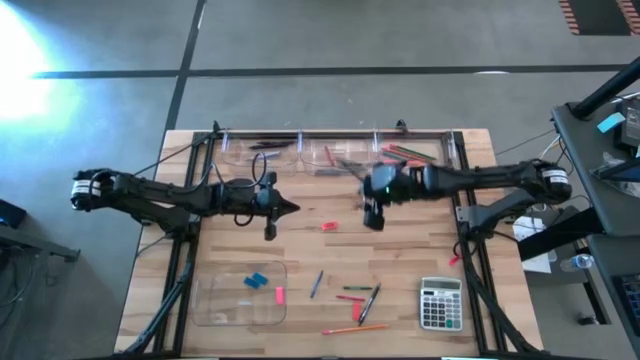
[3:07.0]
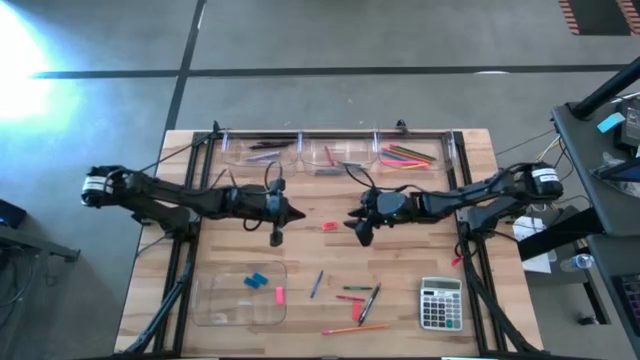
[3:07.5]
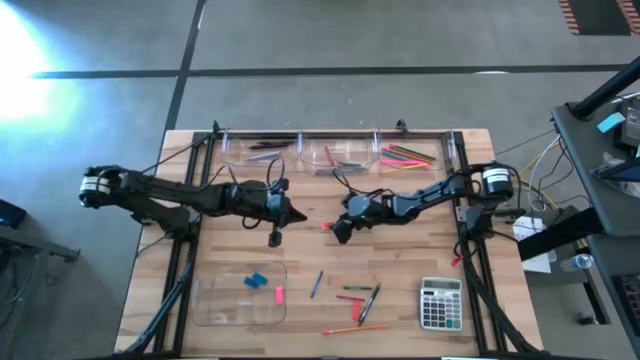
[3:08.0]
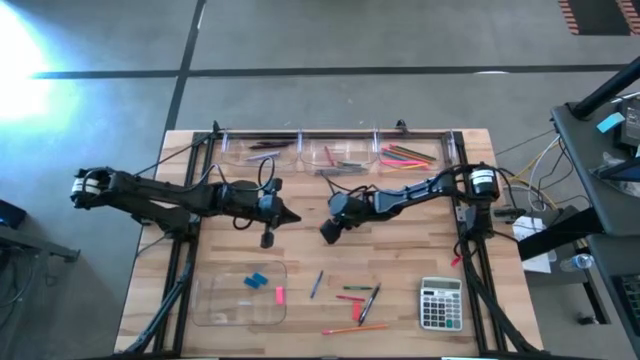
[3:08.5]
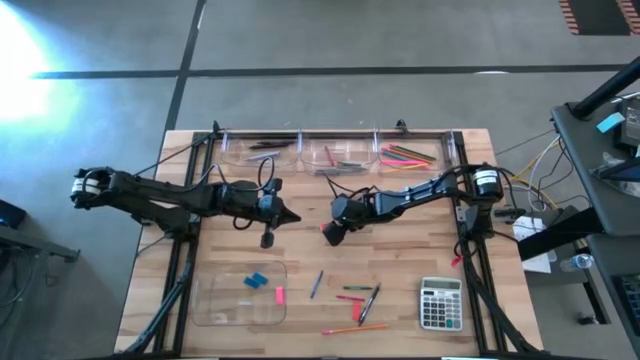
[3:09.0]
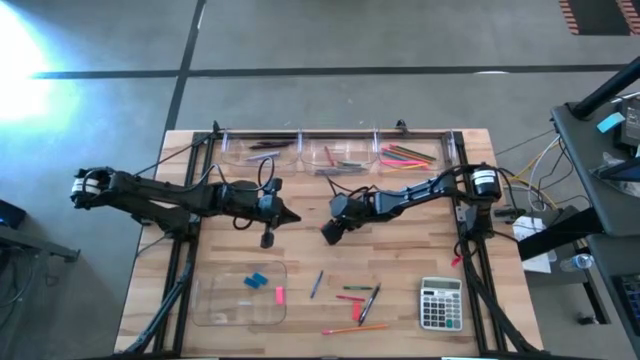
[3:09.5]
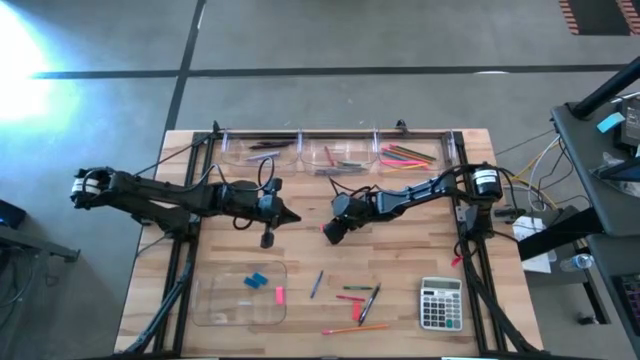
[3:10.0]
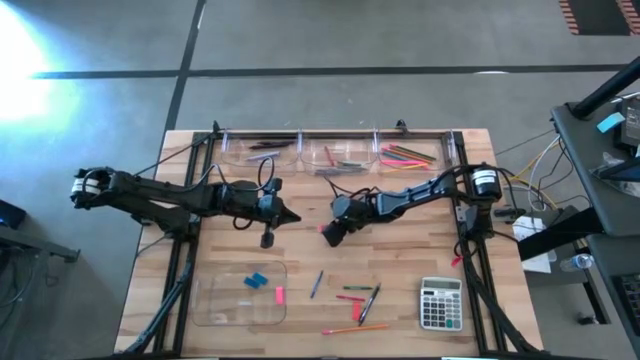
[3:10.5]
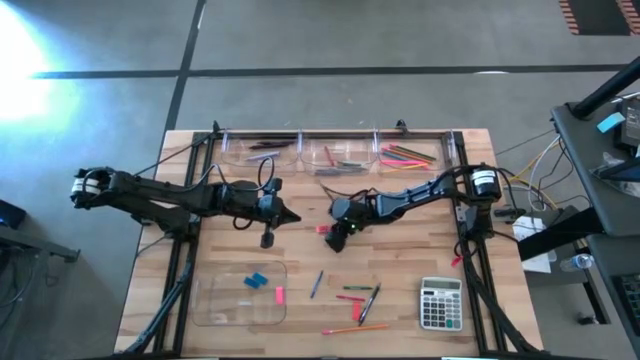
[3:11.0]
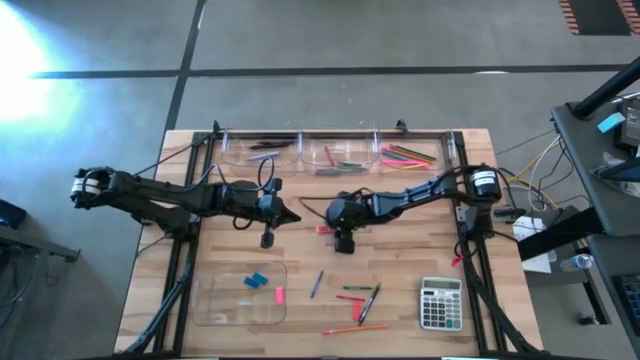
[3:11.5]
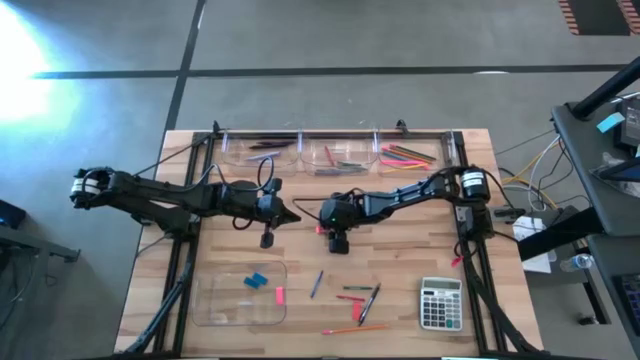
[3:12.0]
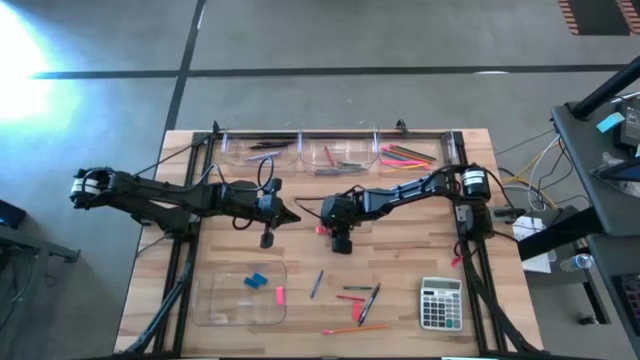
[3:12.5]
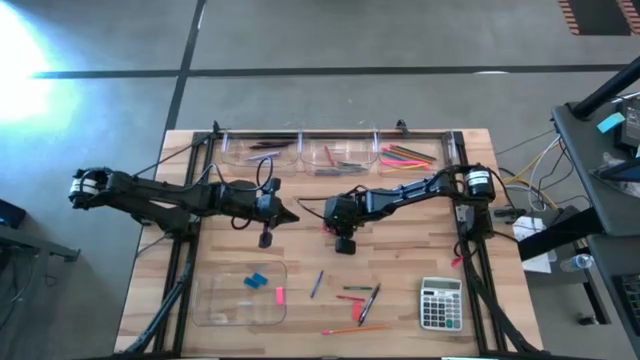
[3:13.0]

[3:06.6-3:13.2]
Task: Sort crayons/erasers/pens/pencils in bins
Put the orange eraser into the bottom transparent bin

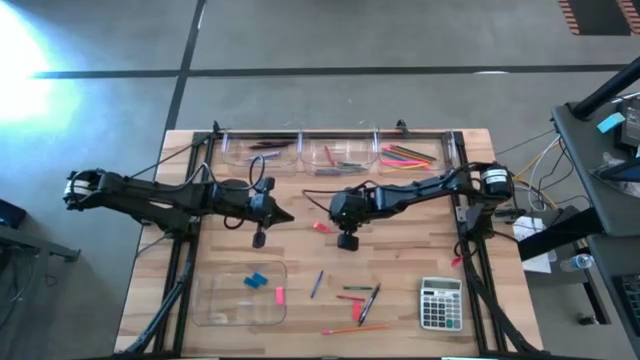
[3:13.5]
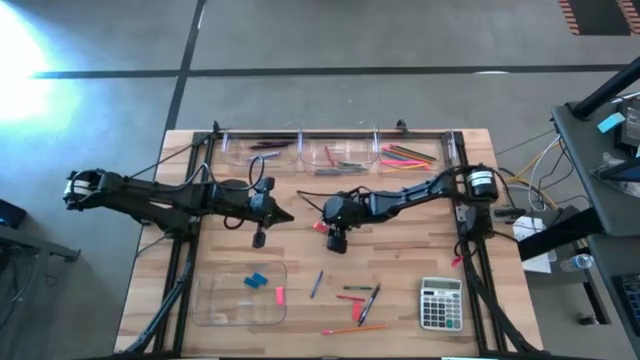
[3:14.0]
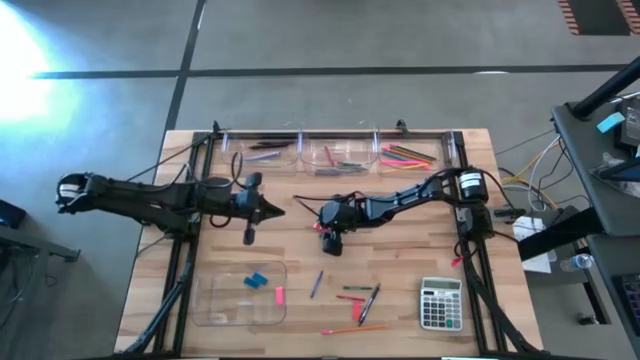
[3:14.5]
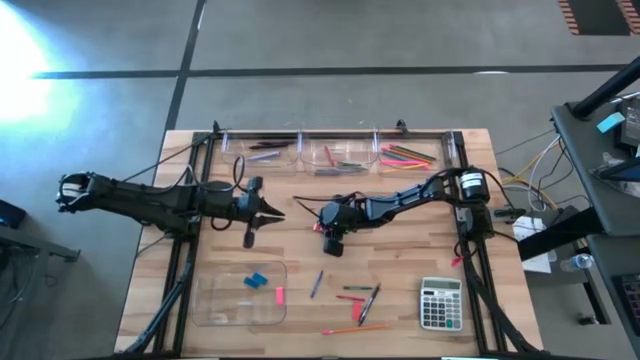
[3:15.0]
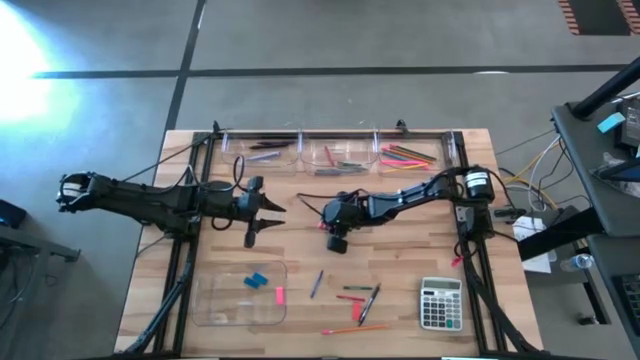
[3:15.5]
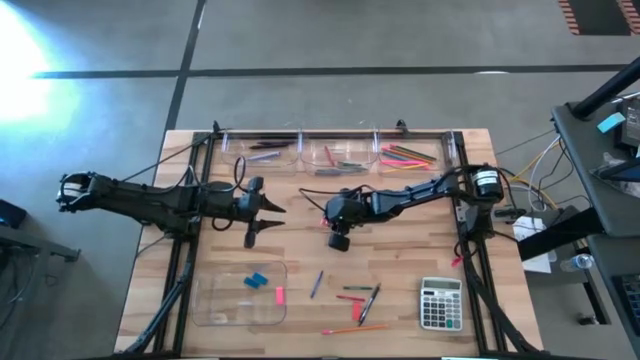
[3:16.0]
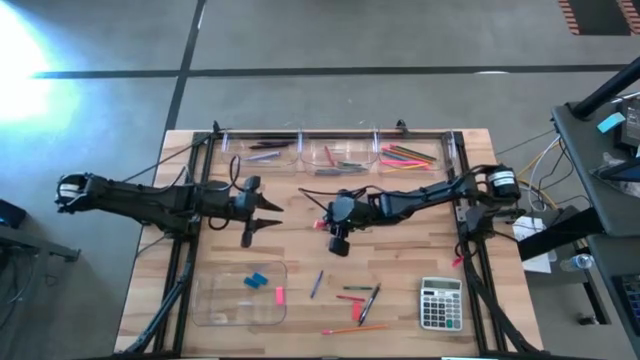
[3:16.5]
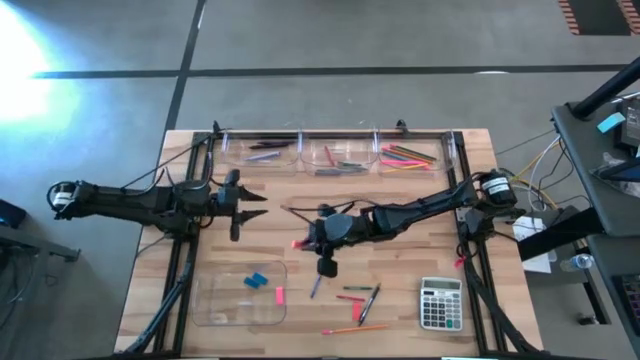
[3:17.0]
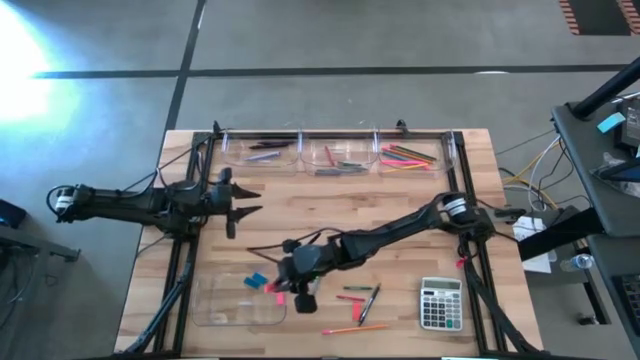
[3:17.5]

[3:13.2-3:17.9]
Put the orange eraser into the bottom transparent bin

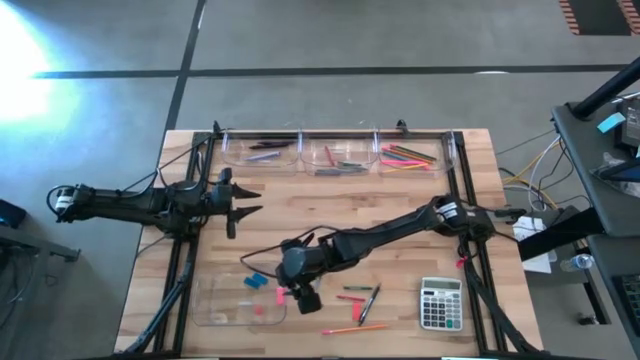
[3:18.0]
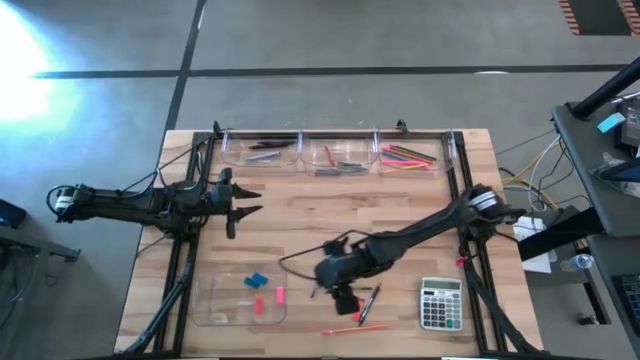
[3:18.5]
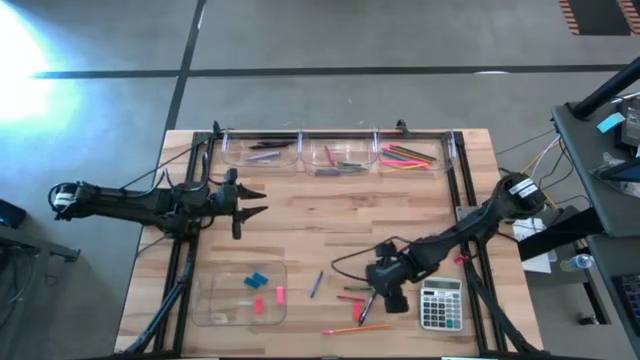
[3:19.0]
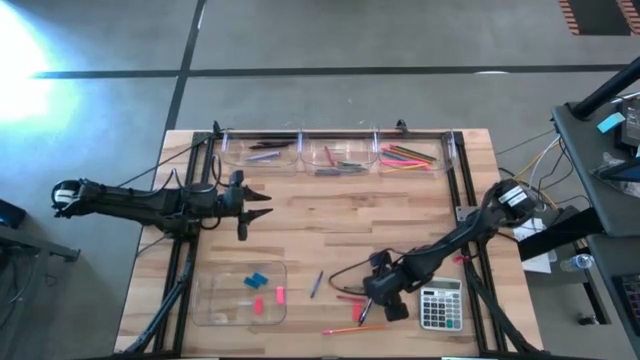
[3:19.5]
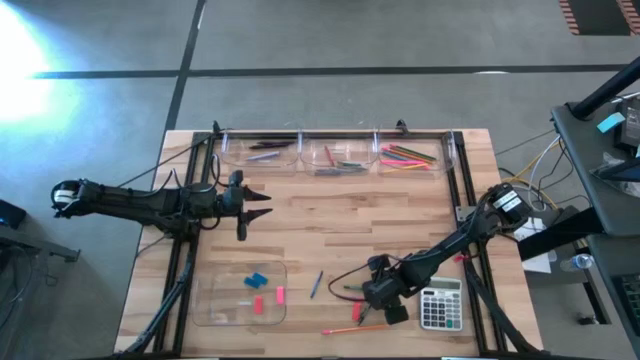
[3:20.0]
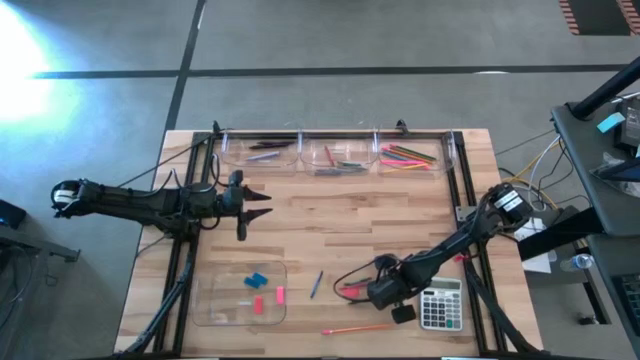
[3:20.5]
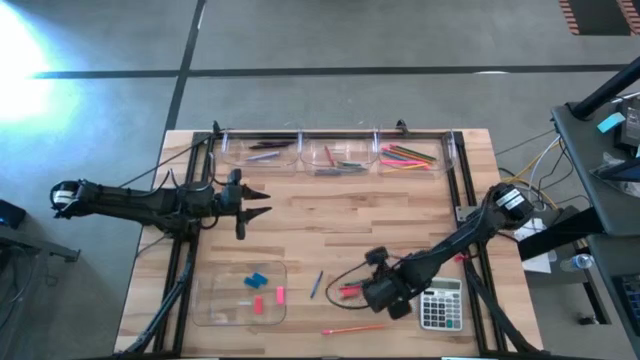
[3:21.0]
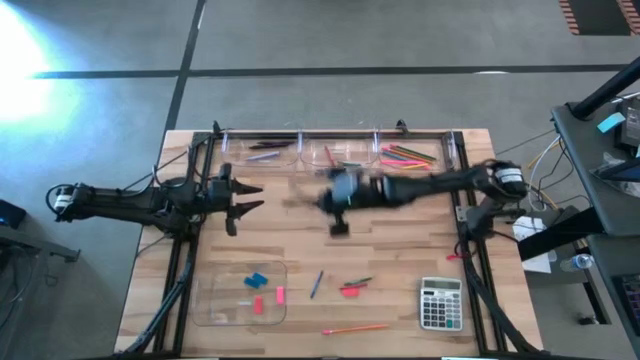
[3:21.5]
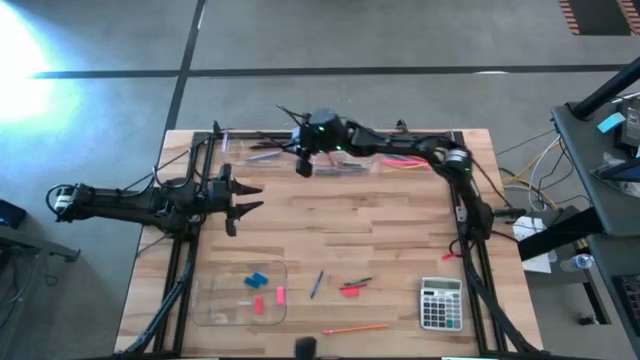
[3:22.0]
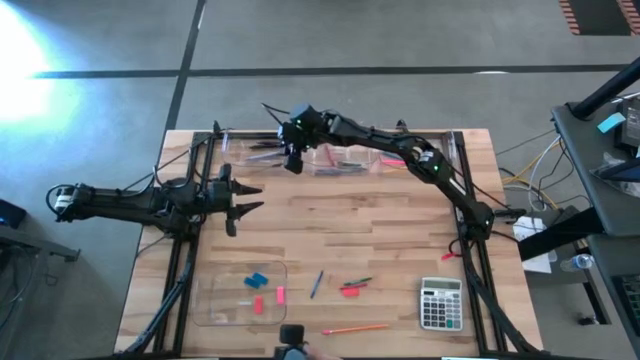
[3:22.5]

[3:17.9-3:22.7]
Put the black pen into the top left transparent bin

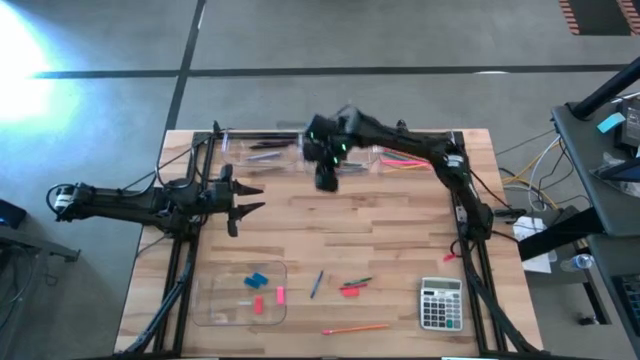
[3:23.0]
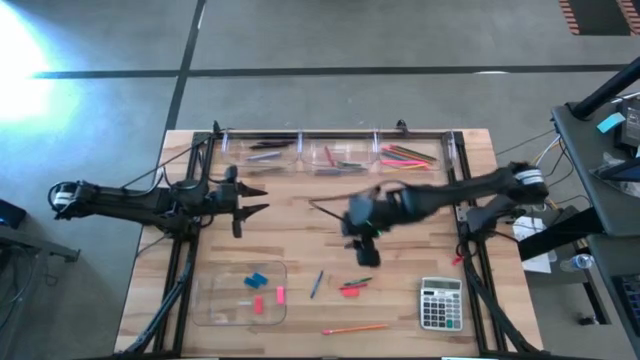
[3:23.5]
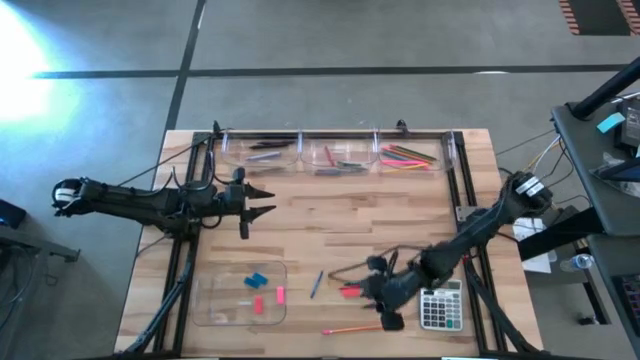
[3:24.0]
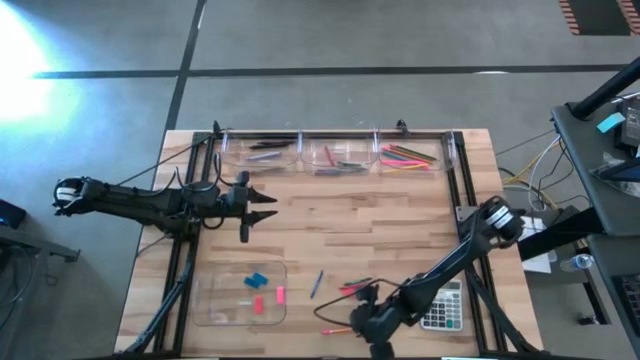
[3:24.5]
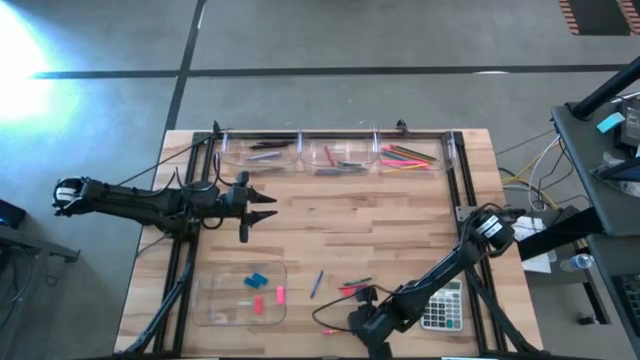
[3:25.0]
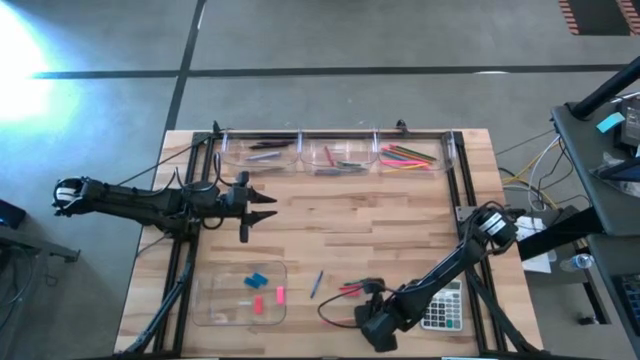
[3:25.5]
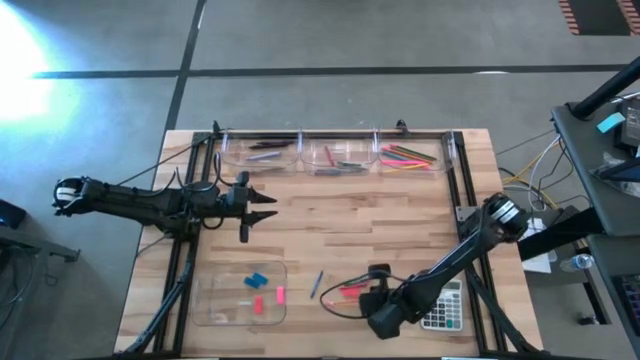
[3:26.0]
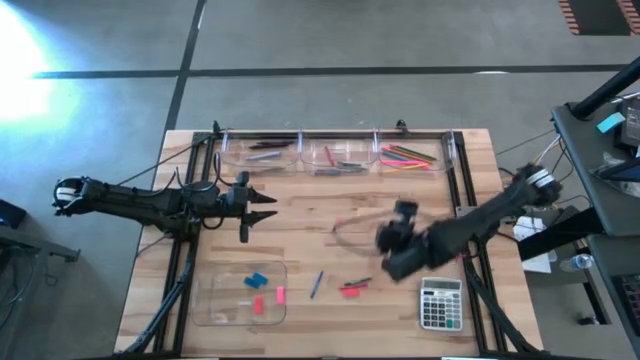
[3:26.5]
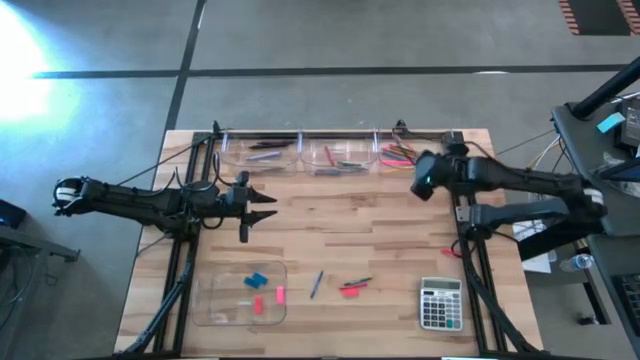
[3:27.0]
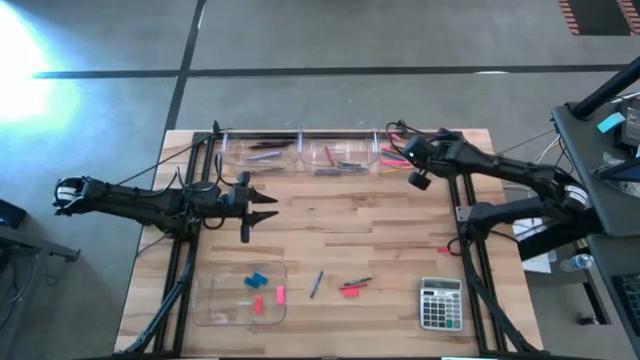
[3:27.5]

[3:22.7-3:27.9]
Put the orange pencil into the top right transparent bin
